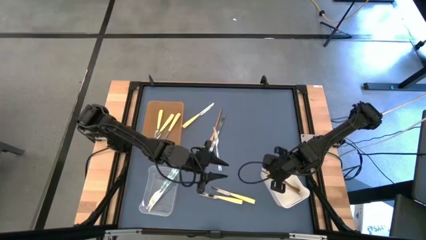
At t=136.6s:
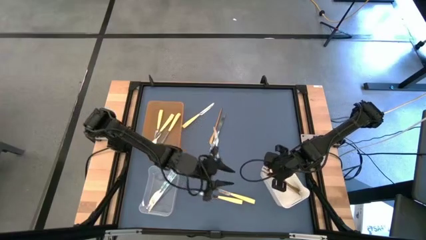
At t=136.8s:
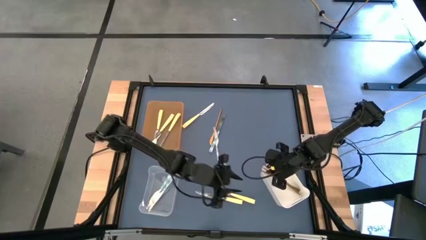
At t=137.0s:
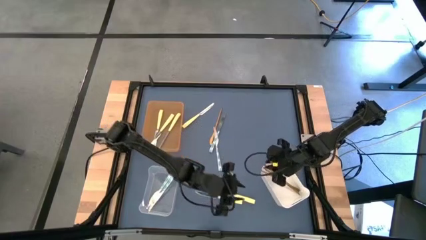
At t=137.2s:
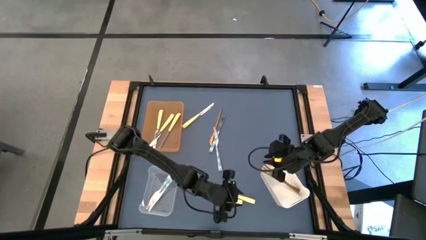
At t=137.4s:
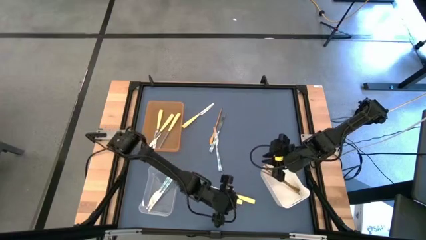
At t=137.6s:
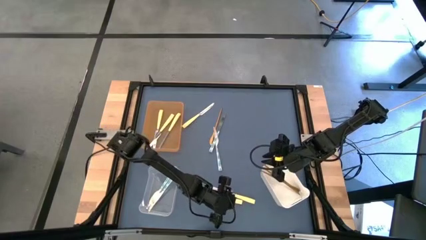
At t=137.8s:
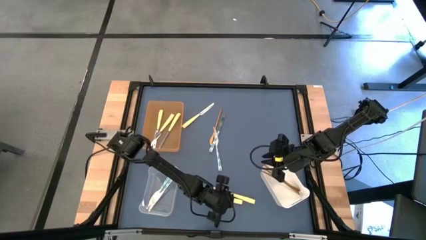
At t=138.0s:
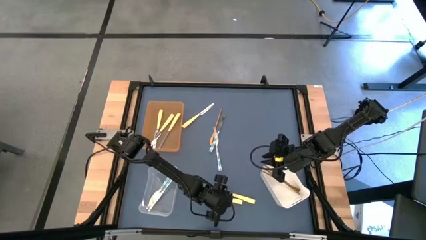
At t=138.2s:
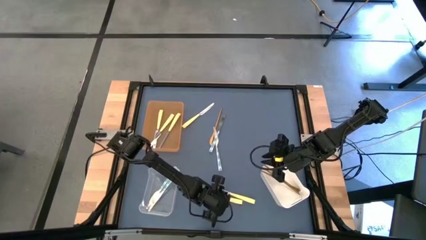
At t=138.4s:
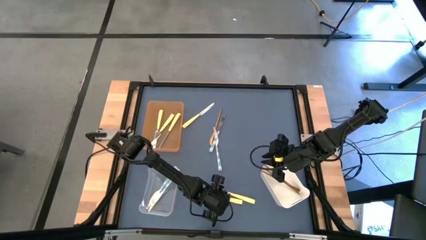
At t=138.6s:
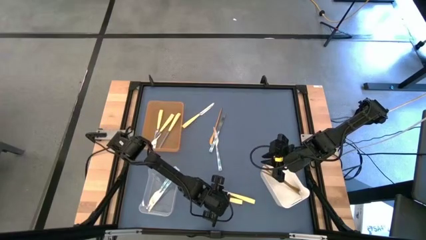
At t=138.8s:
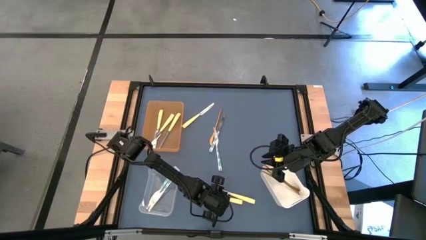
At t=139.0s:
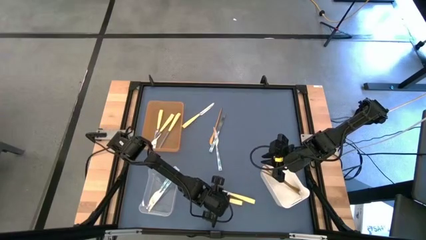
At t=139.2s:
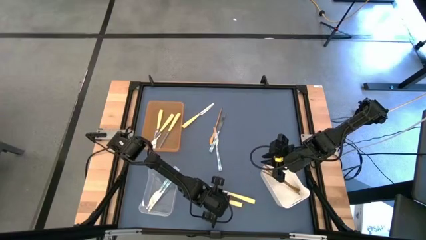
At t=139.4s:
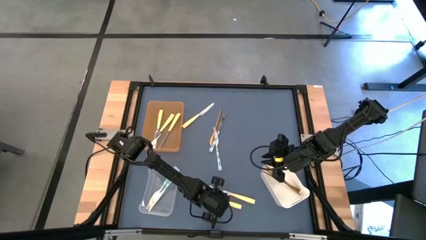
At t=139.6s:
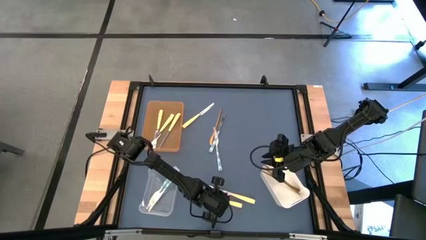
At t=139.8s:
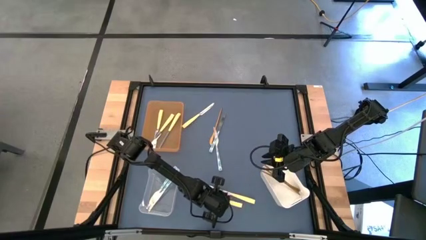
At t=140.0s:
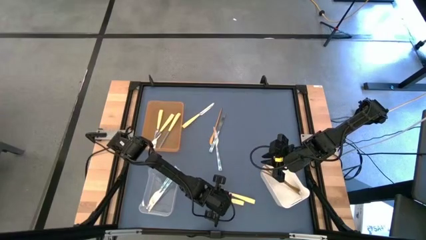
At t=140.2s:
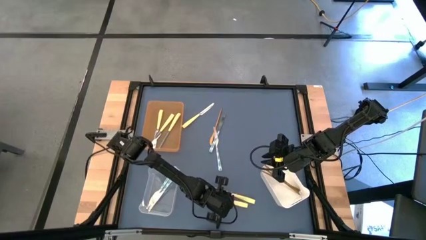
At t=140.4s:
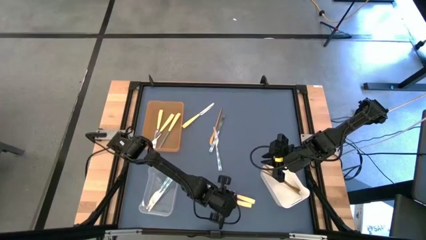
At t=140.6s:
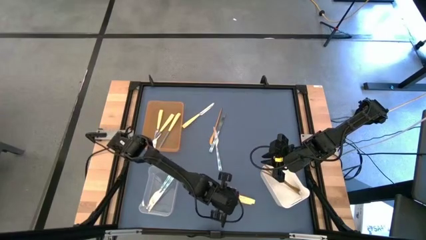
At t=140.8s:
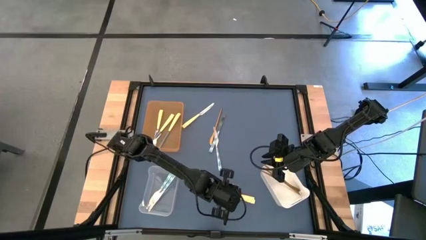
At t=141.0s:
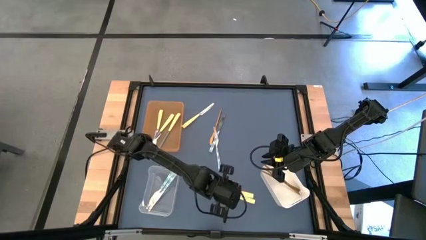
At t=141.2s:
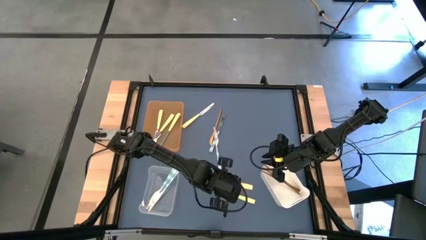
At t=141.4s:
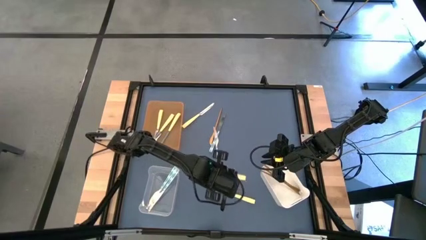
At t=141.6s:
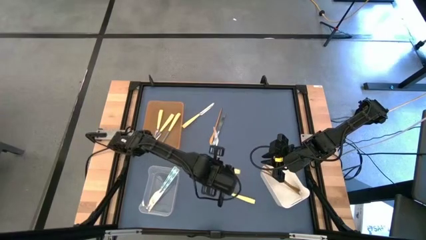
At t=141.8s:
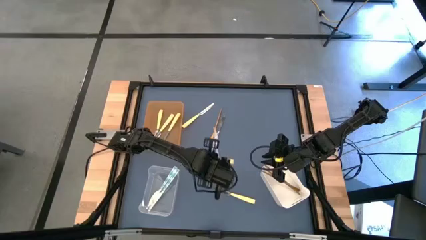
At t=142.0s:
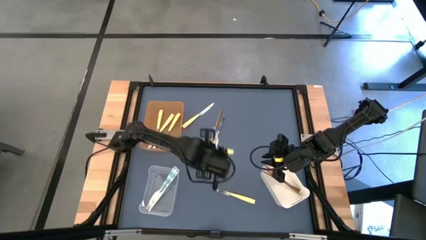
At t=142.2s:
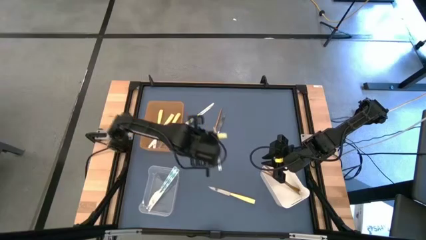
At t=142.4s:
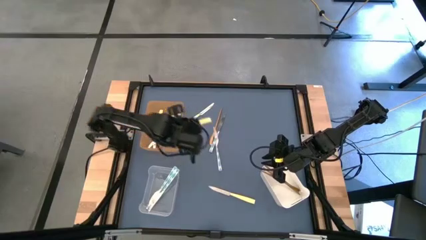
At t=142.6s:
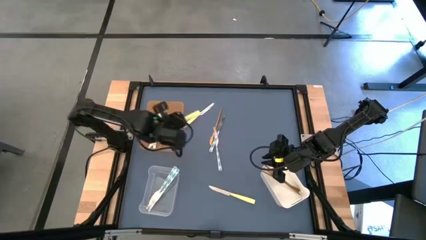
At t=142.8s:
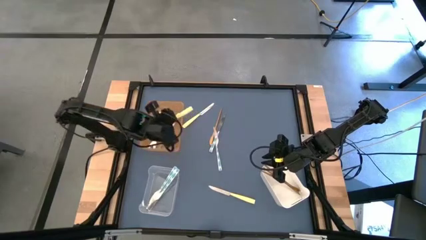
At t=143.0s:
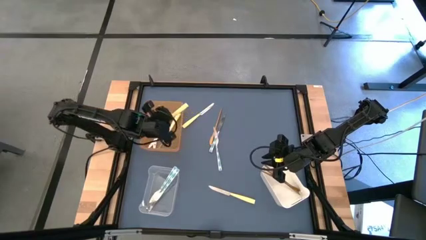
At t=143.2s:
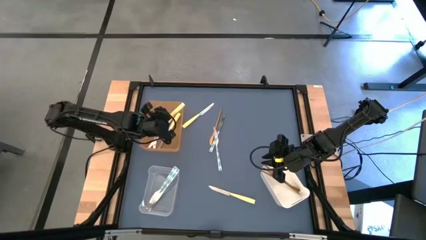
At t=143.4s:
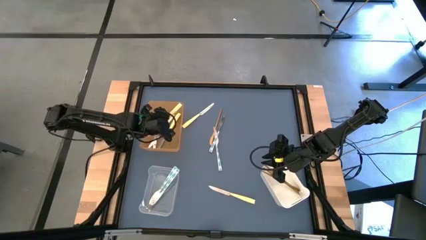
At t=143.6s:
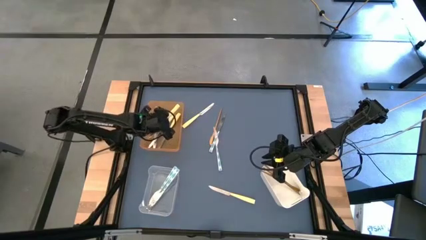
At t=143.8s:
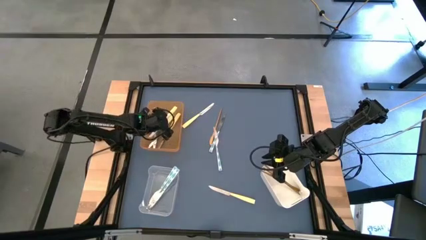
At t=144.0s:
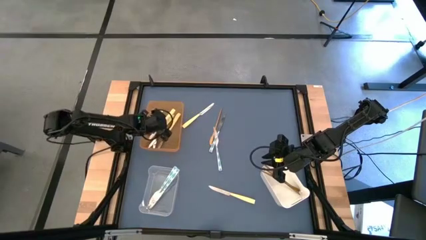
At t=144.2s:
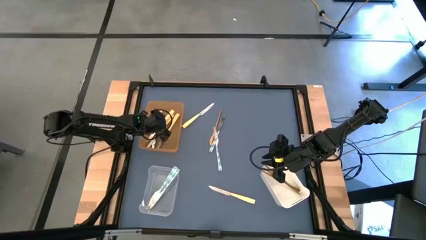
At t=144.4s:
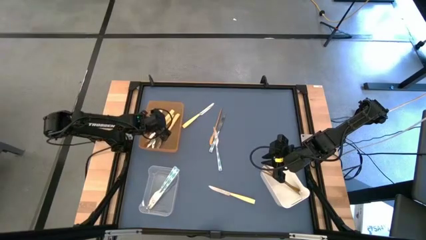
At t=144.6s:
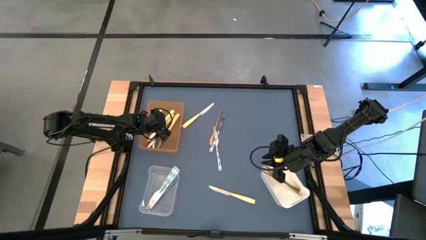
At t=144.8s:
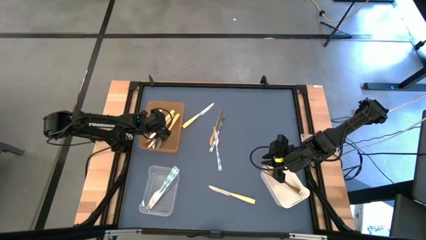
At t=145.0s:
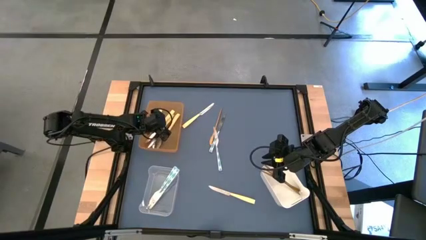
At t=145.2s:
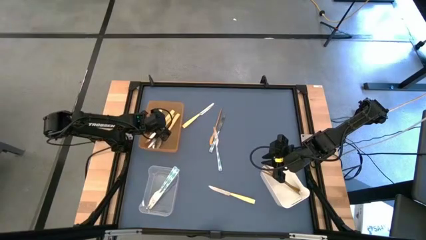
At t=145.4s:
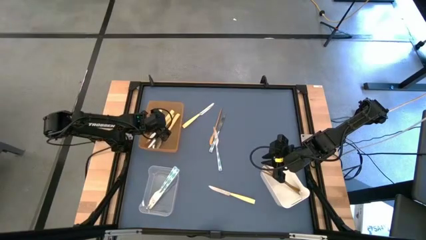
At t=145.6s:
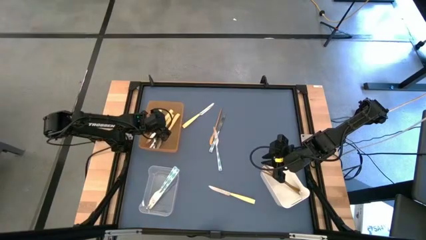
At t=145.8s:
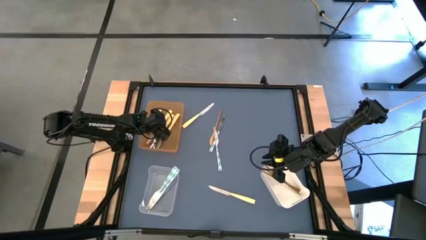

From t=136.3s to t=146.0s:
Task: Sort silverware by color (type)
Put the yellow knife into the orange bin

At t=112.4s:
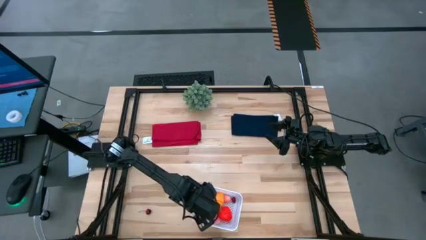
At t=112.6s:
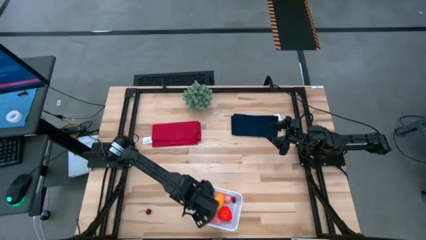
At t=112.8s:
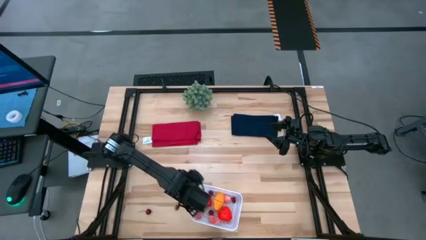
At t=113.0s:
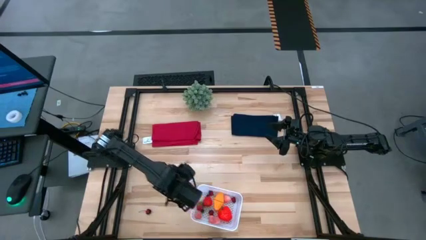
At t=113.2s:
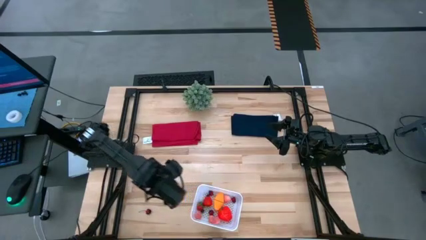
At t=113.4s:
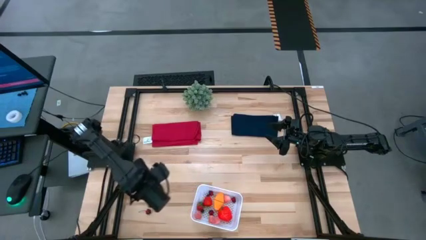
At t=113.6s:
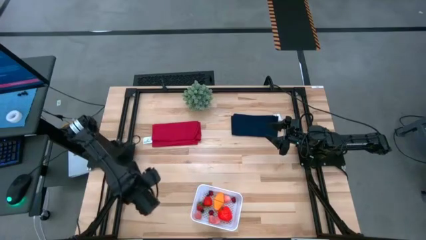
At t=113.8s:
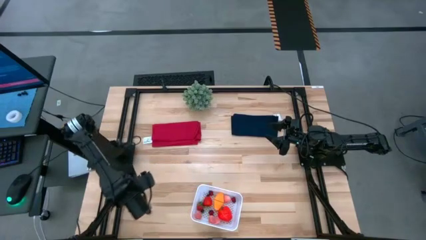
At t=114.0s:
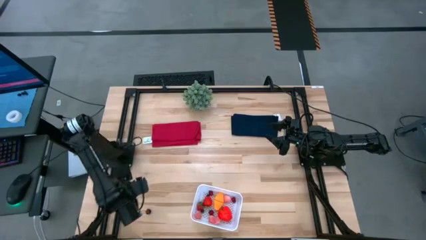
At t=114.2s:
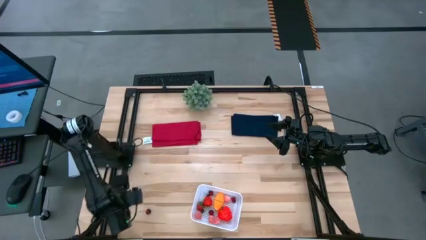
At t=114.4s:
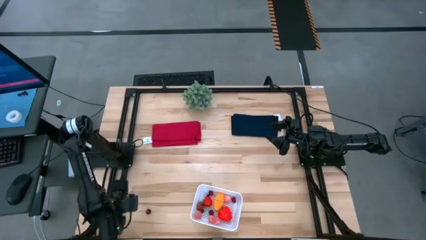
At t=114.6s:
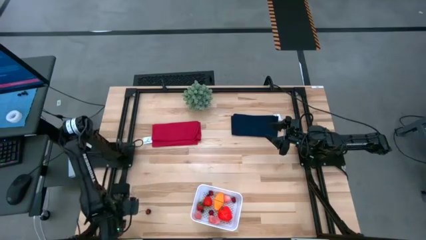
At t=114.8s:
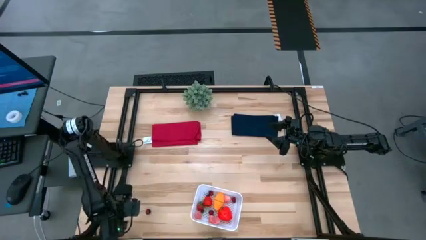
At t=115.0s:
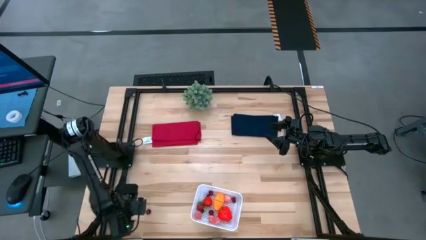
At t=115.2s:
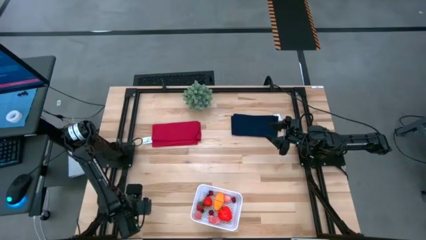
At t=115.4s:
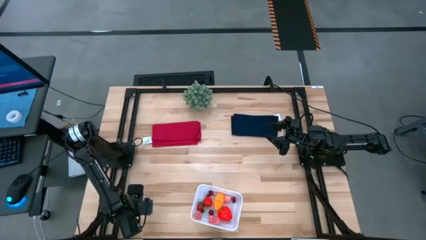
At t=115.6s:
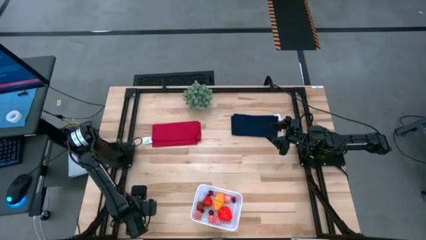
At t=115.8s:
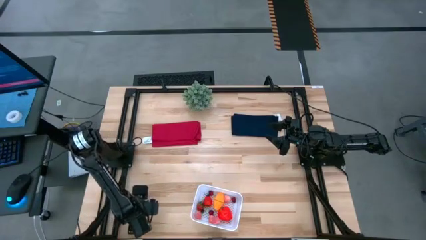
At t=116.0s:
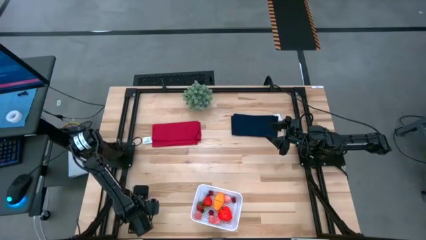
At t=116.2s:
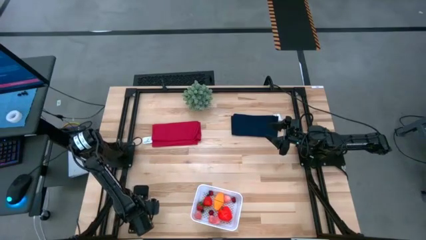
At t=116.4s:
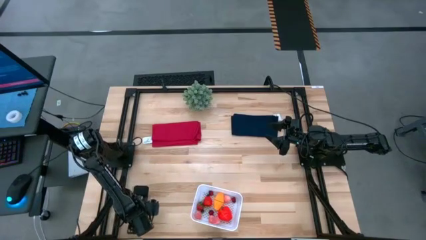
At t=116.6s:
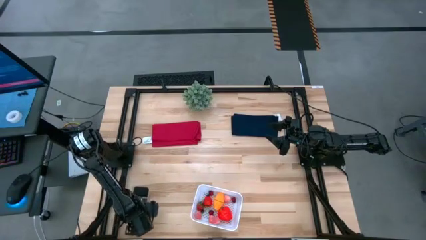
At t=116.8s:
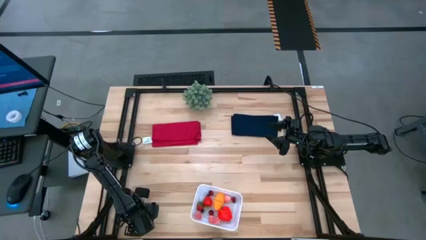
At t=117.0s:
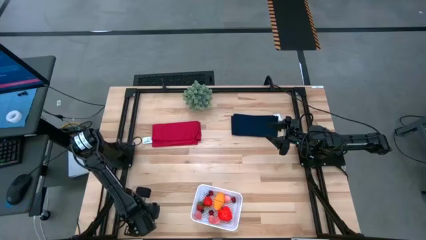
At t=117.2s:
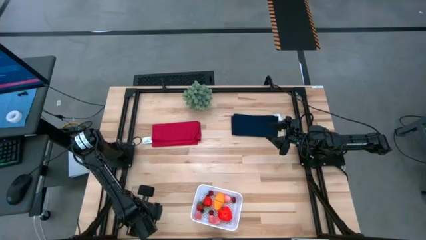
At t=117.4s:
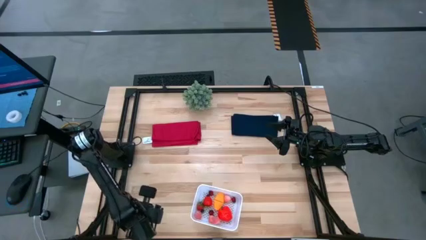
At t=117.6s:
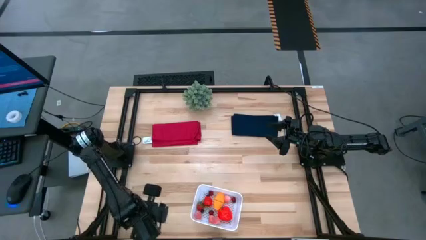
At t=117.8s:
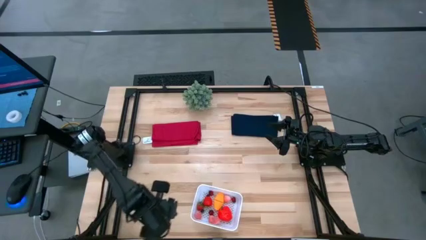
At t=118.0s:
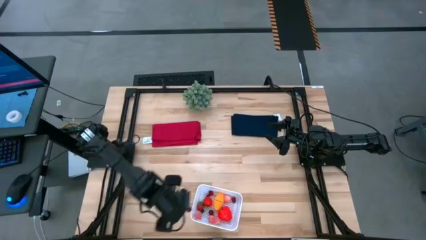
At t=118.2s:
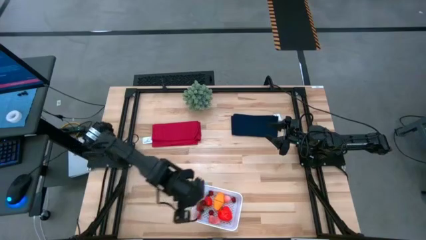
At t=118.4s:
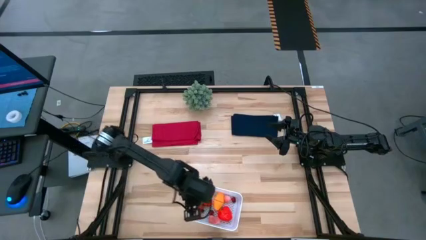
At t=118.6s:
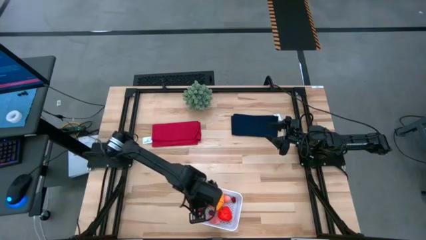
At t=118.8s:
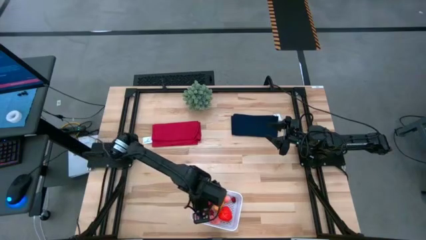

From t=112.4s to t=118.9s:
Task: Pick and placing Produce into tupperware
Put the cherry into the white bin
